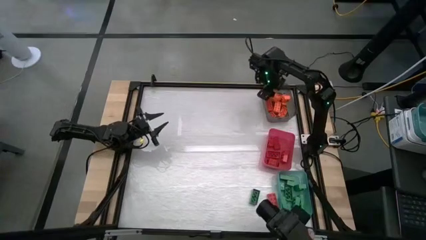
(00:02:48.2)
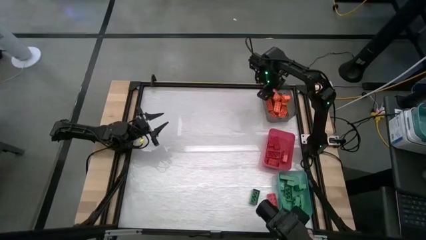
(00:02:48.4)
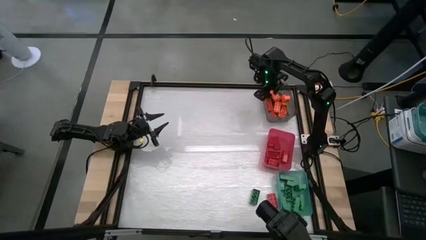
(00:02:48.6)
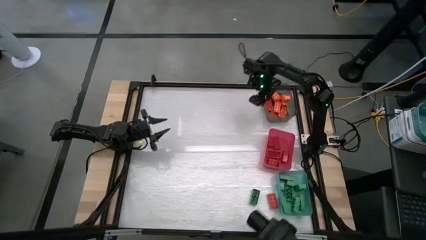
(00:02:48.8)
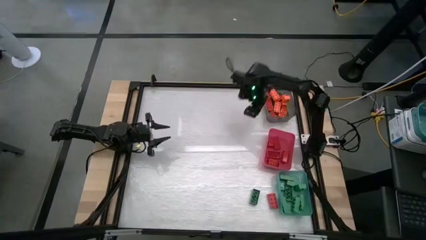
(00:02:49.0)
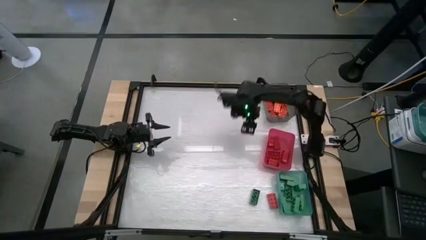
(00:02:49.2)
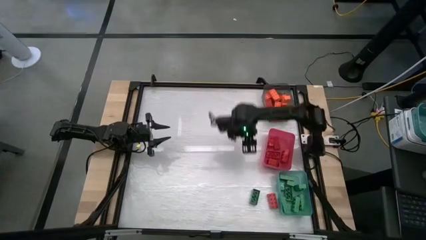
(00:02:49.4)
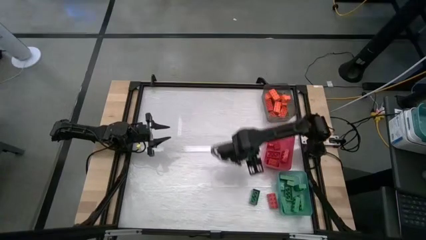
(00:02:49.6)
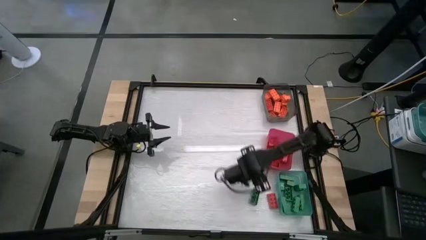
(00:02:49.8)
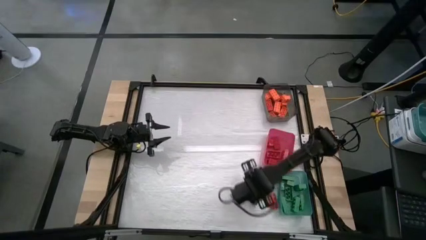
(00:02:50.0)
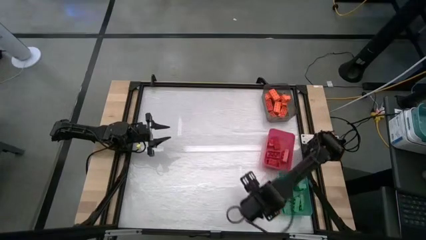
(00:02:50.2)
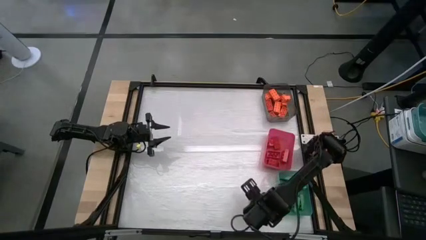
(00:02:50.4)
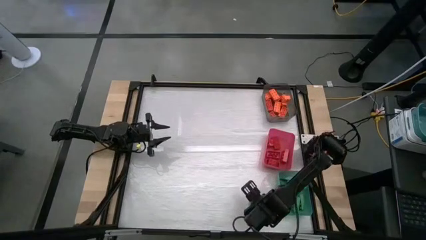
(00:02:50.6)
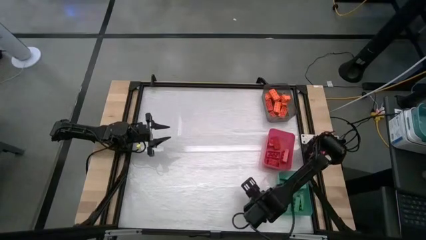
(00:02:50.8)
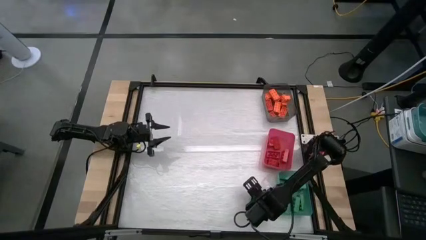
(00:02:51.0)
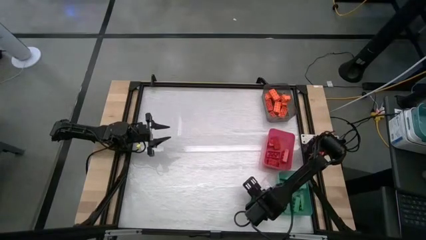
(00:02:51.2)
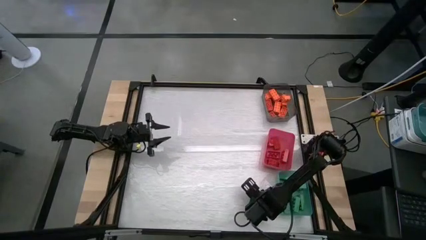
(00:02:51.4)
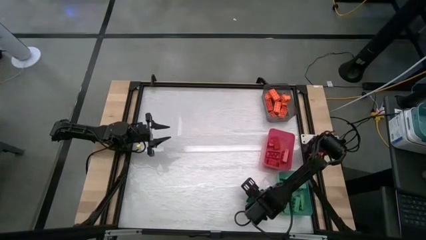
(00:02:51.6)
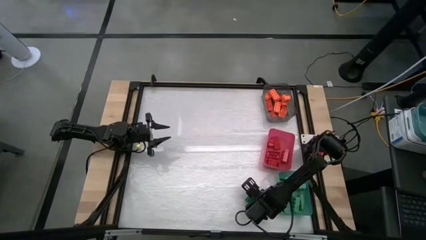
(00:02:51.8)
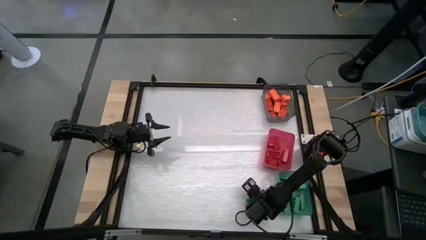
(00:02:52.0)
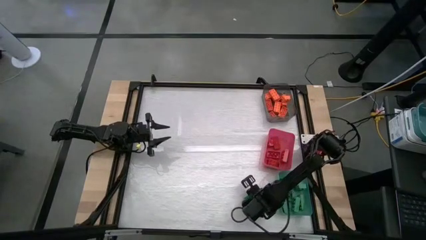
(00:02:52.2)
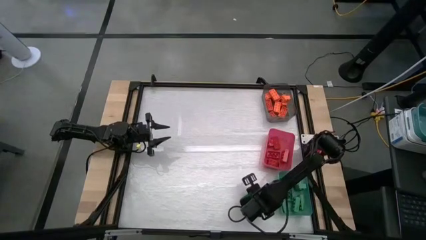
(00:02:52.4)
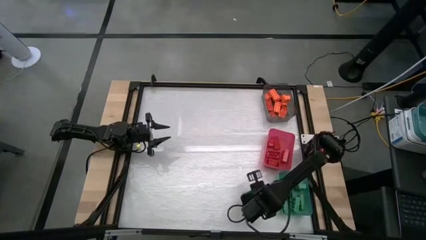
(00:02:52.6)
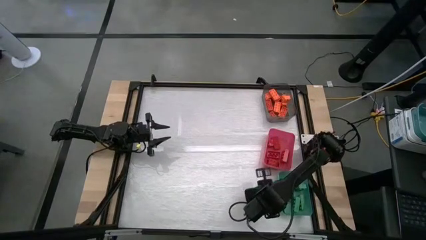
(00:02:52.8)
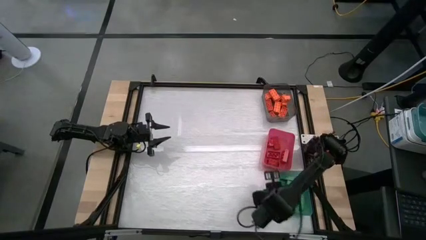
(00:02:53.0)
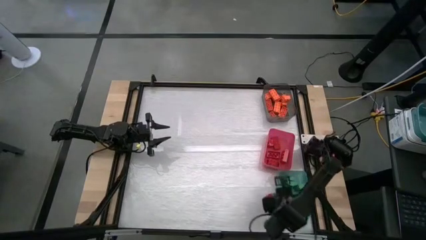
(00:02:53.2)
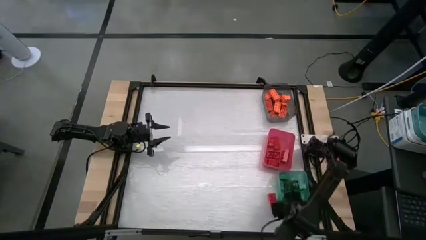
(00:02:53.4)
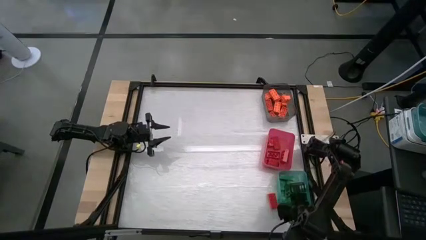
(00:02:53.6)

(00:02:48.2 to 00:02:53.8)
Task: Sort blocks
Put the green game piece into the blue bin

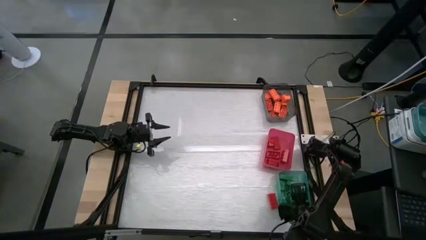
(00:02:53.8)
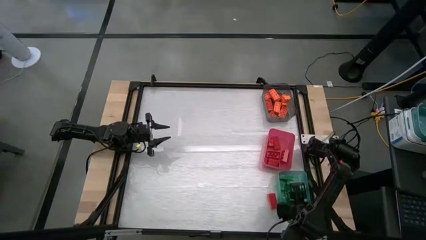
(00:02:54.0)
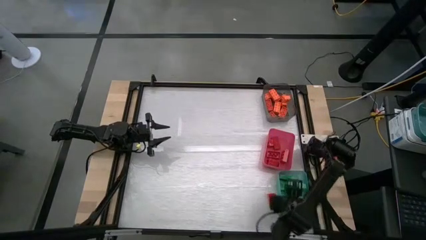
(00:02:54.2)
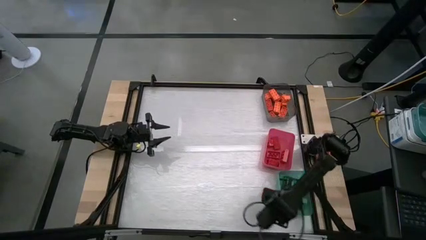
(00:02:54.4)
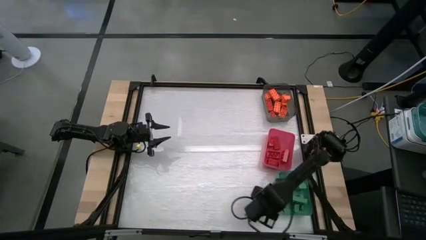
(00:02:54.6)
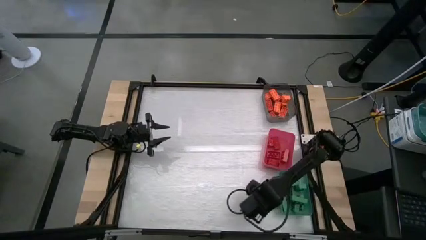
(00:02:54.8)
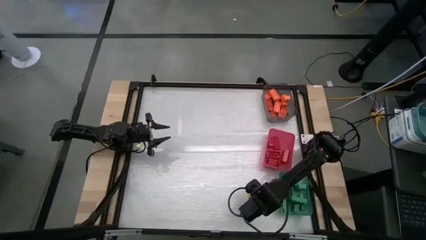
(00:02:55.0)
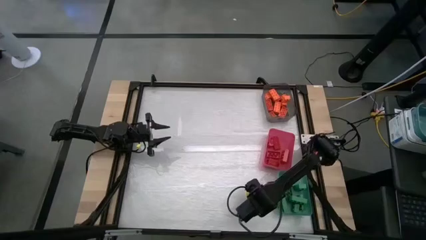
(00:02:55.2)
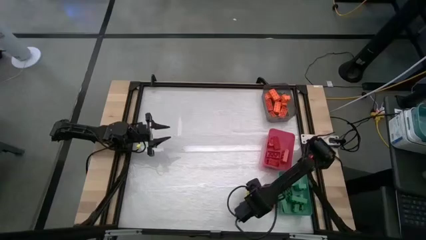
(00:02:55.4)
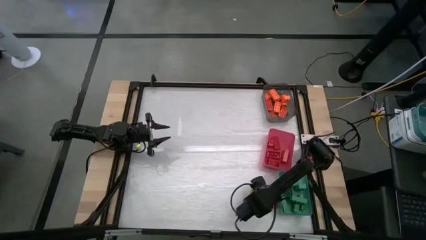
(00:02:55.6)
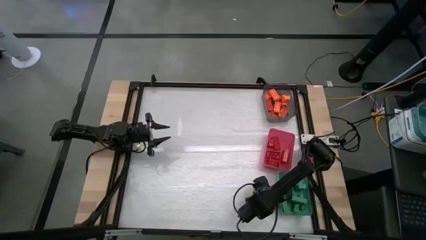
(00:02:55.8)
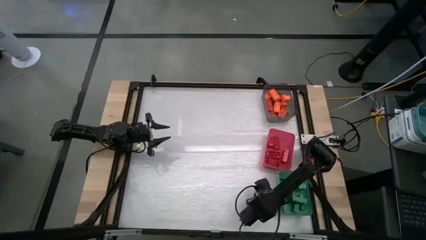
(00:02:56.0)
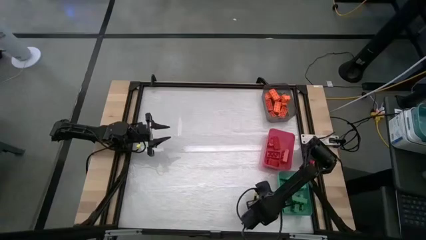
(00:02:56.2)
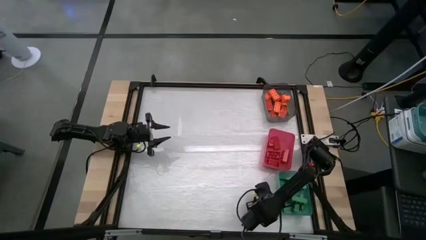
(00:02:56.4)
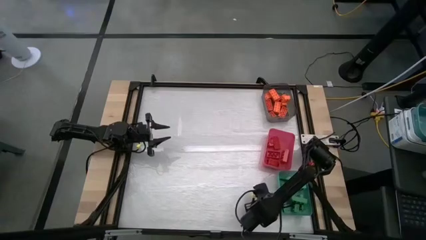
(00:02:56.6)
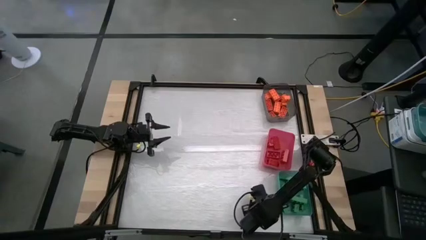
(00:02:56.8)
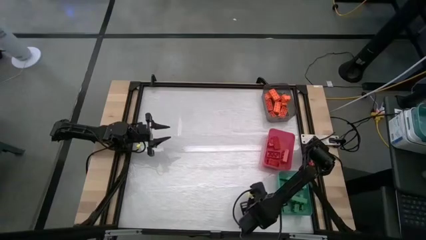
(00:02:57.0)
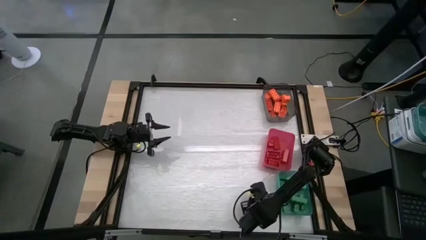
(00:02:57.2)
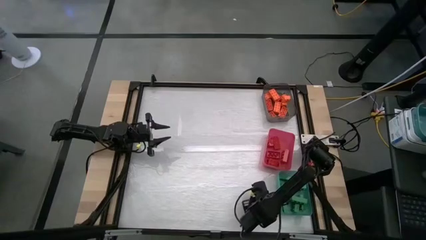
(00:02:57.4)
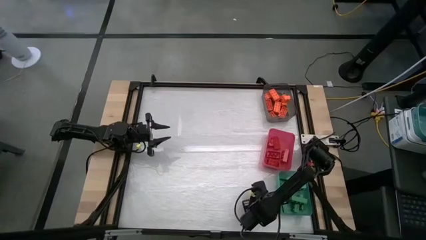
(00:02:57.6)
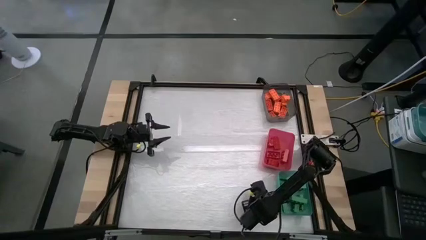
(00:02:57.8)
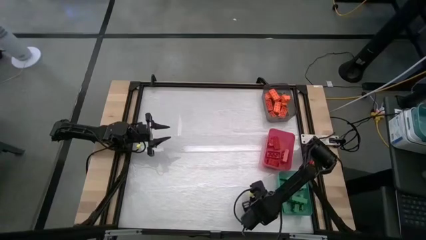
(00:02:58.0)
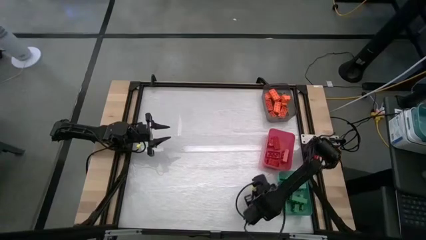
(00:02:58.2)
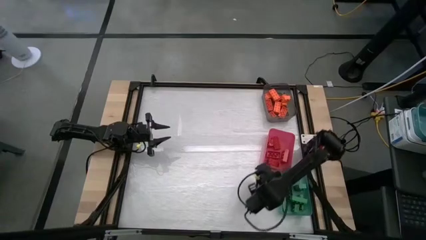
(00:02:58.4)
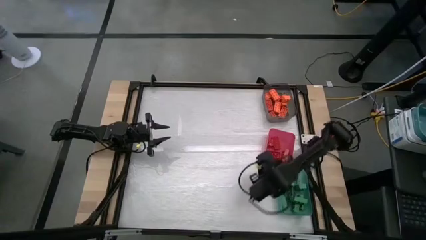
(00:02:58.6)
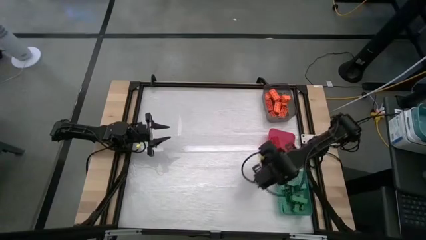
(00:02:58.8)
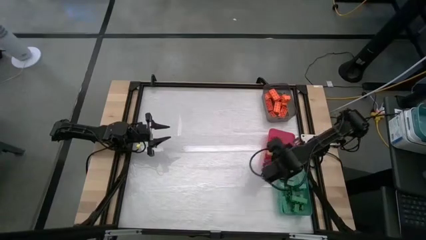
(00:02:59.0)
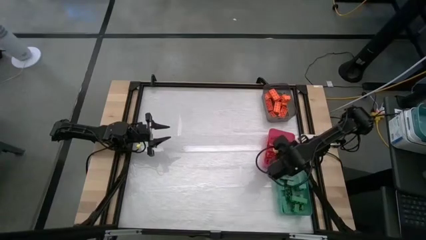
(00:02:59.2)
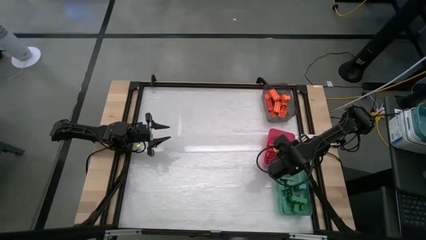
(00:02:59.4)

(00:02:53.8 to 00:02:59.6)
Put the red game piece into the red bin

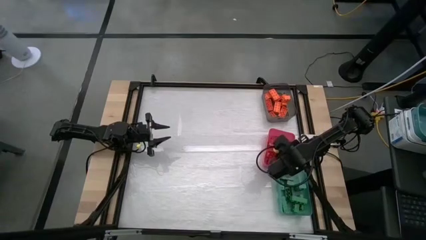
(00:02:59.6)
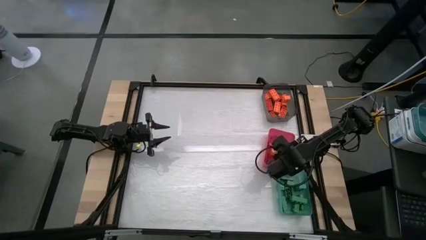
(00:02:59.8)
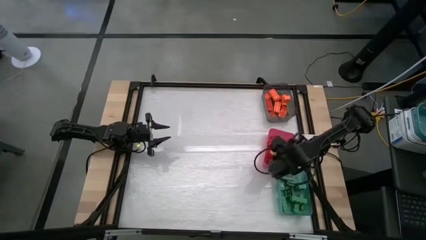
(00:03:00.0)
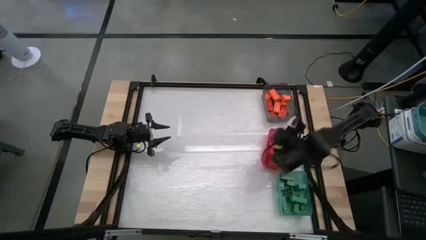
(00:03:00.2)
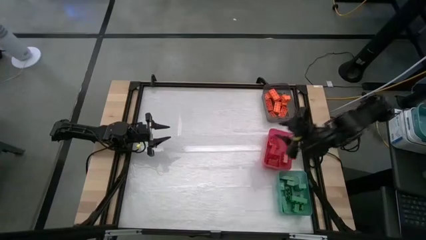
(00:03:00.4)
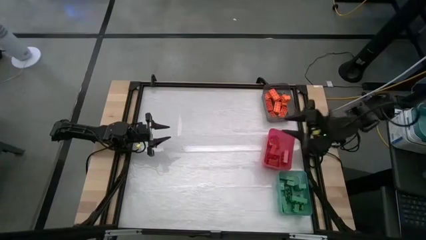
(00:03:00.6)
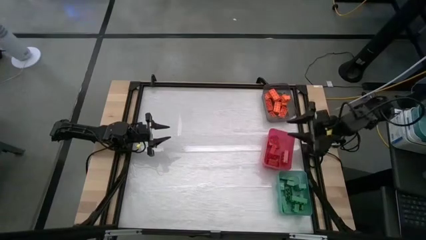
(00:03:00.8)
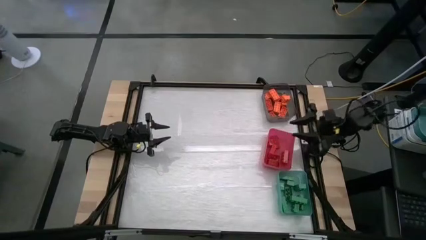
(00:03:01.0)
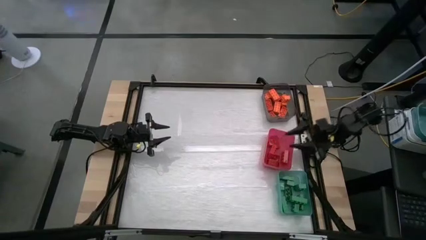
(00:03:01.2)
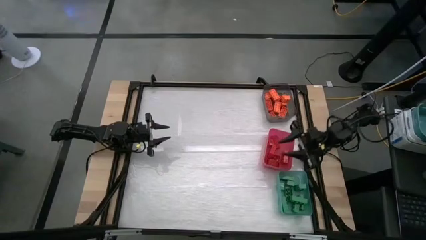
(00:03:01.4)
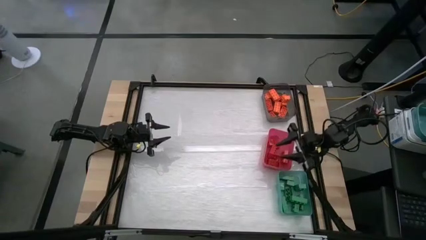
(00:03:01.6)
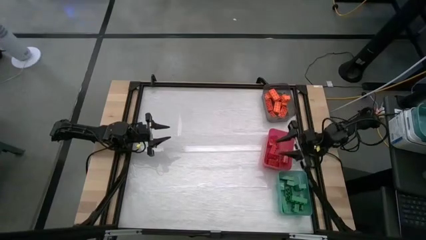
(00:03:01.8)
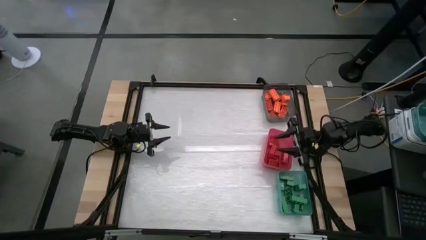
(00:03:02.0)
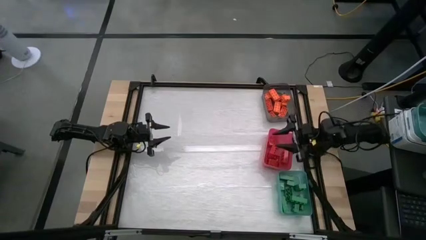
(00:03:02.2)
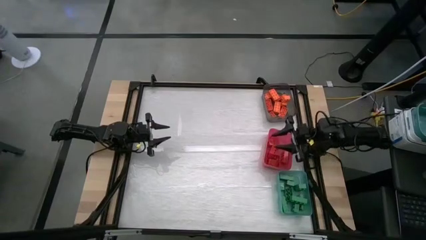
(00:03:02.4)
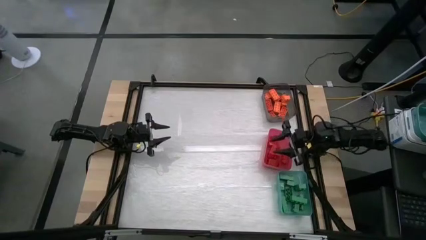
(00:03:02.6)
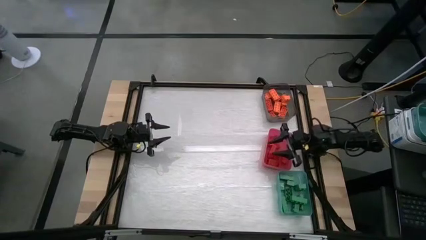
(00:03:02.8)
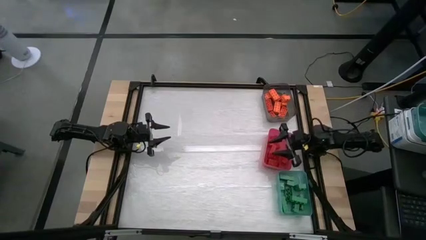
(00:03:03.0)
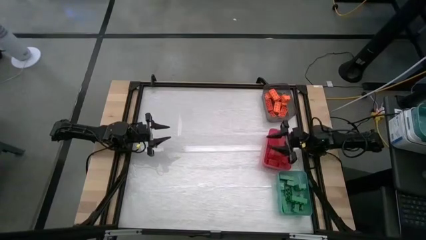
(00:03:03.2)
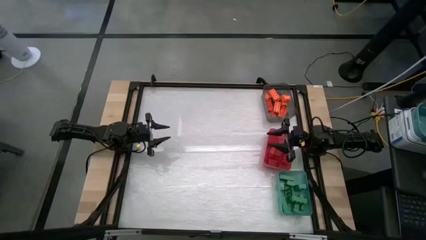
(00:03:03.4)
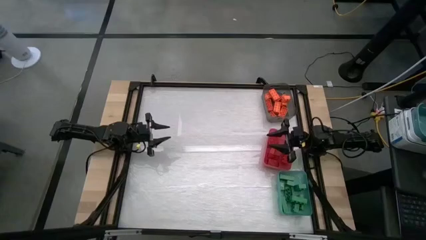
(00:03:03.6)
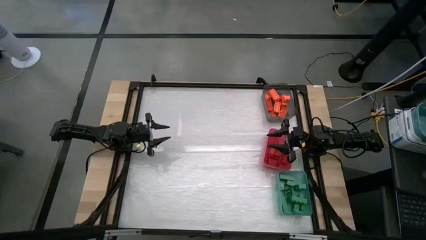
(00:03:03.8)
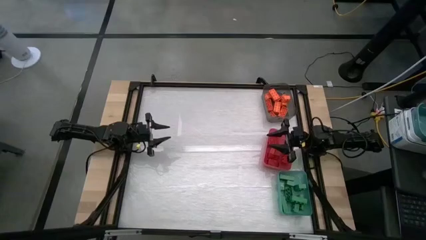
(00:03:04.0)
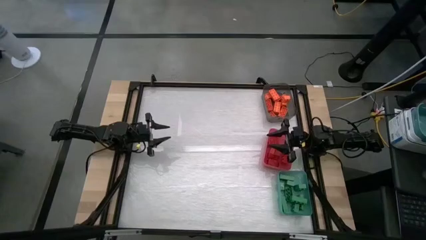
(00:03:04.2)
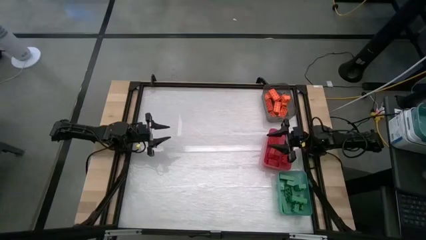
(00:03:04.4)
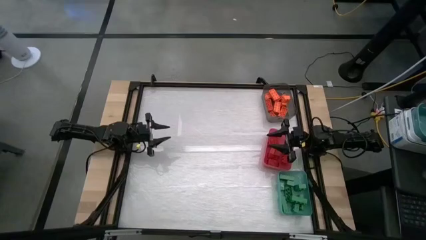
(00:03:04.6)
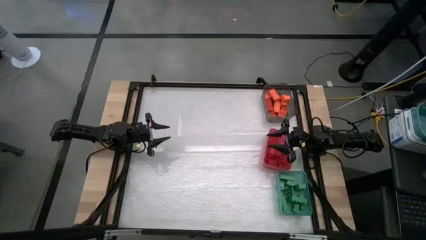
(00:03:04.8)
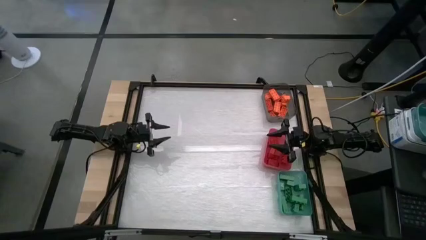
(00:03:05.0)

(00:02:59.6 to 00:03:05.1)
Return to Home Position
